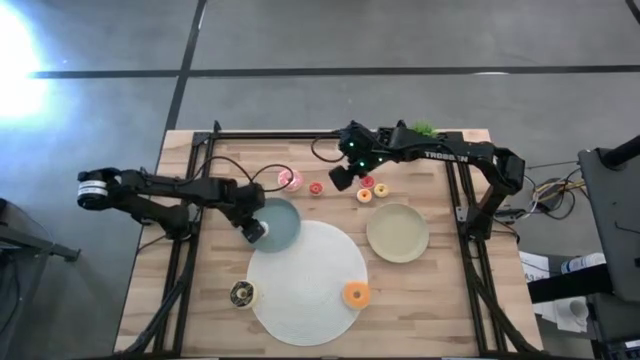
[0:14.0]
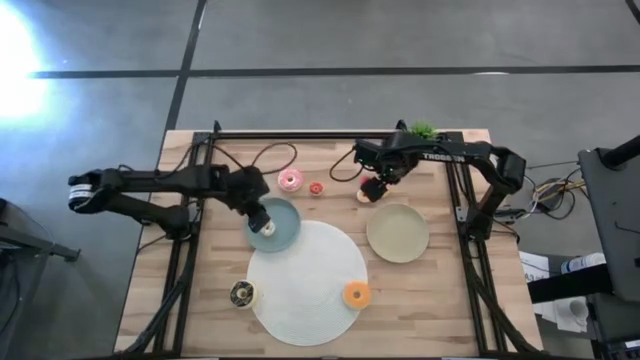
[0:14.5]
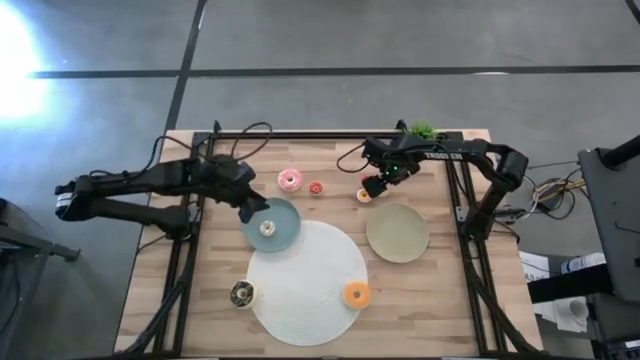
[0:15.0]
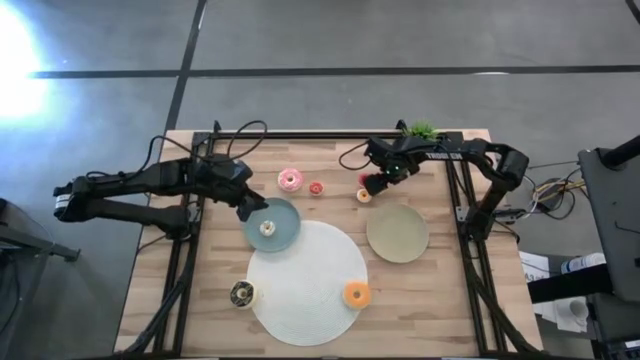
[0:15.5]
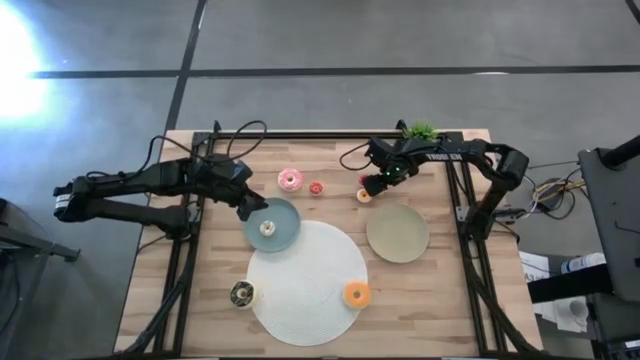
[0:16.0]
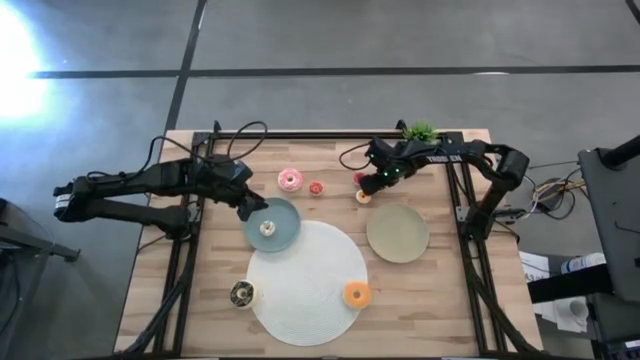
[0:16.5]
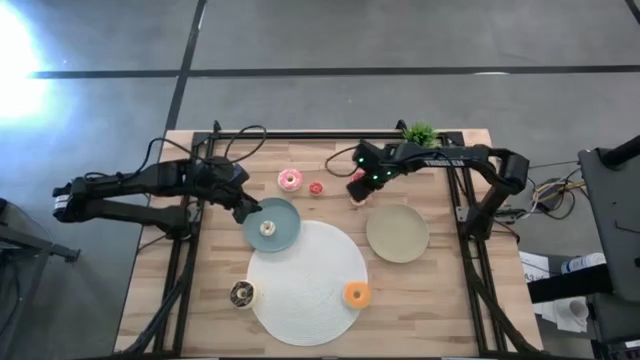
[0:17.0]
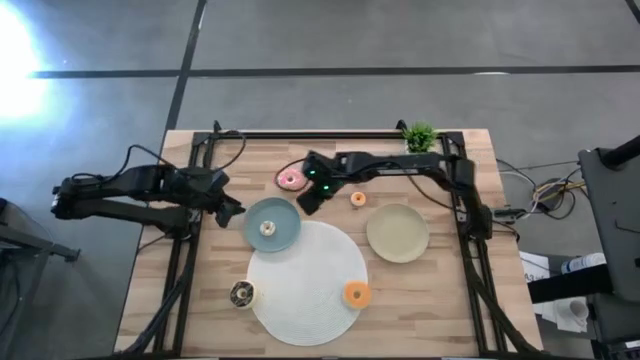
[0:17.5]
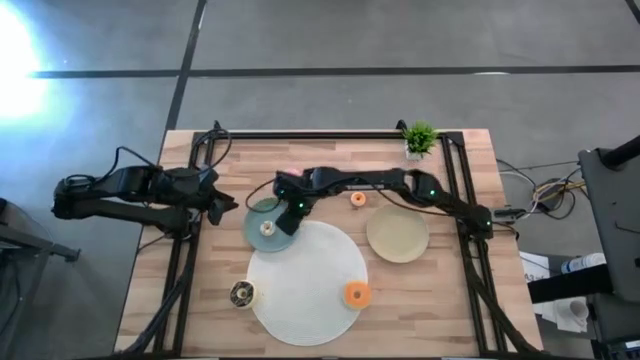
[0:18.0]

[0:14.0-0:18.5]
Task: Pick & Place donuts
Put the small yellow donut on the blue plate

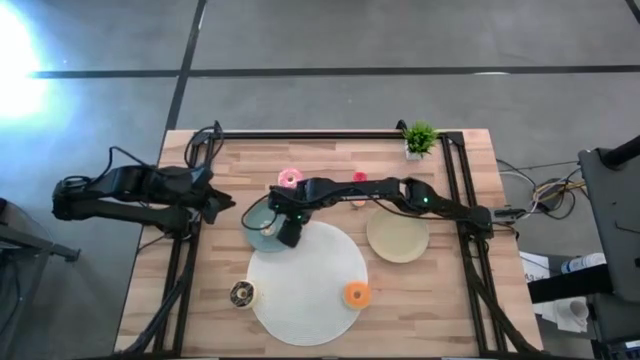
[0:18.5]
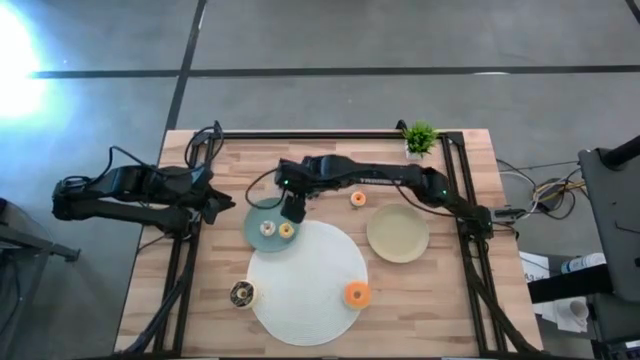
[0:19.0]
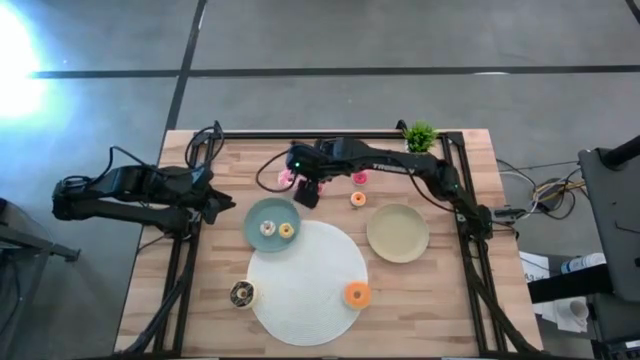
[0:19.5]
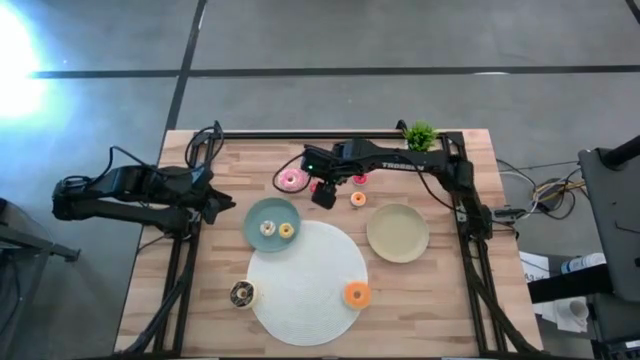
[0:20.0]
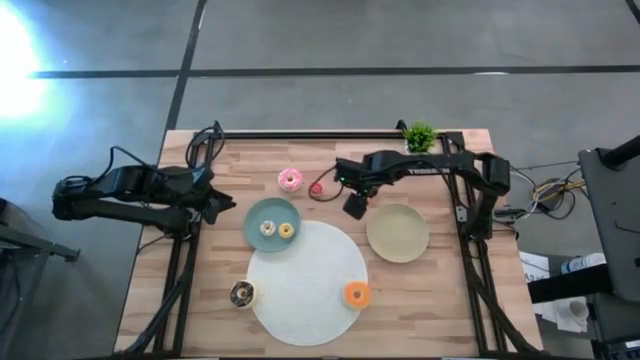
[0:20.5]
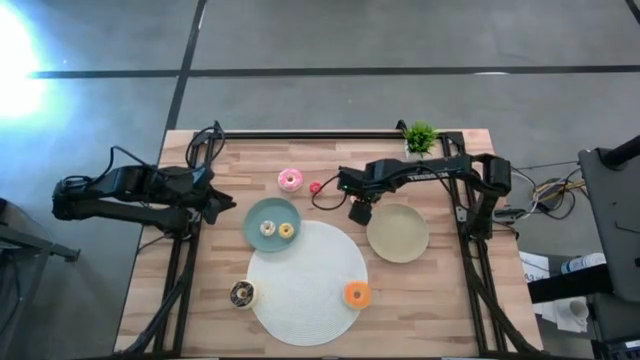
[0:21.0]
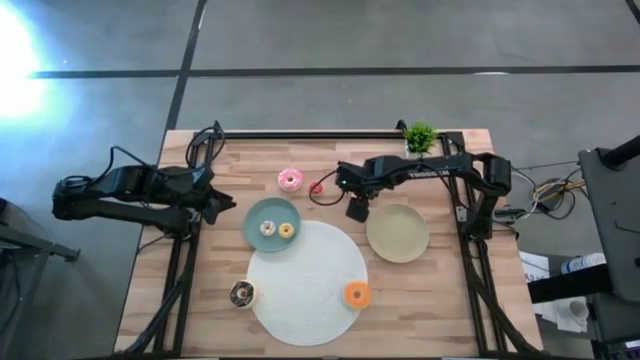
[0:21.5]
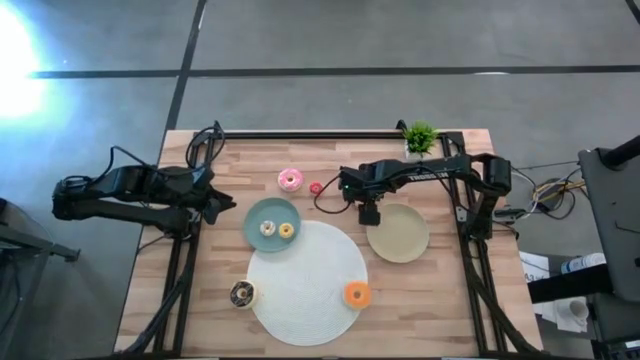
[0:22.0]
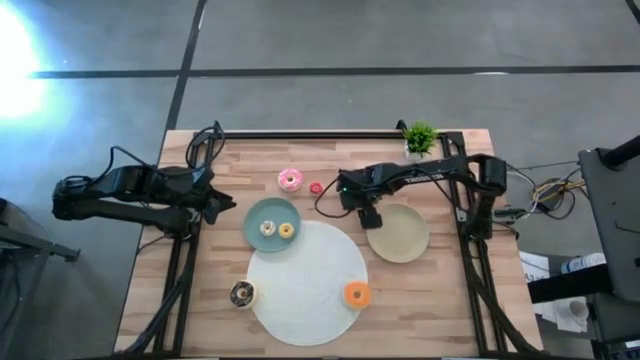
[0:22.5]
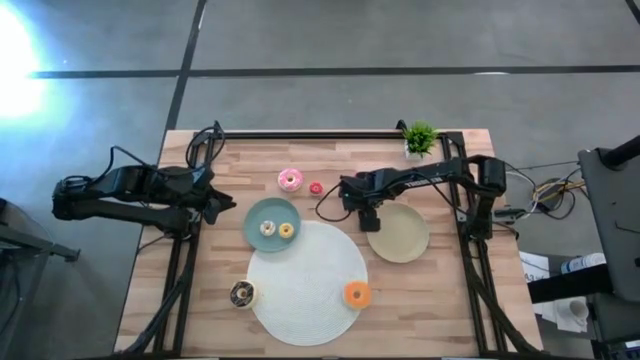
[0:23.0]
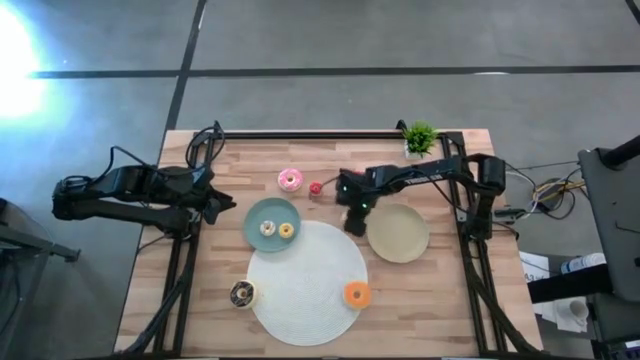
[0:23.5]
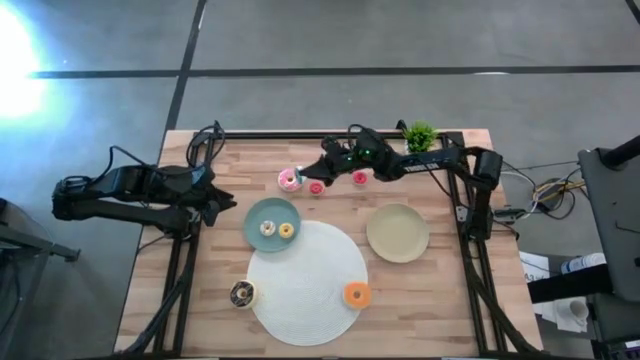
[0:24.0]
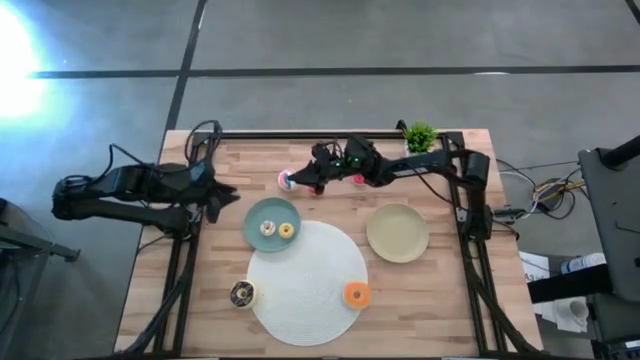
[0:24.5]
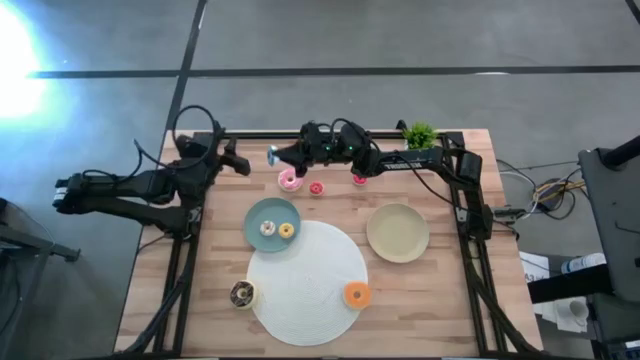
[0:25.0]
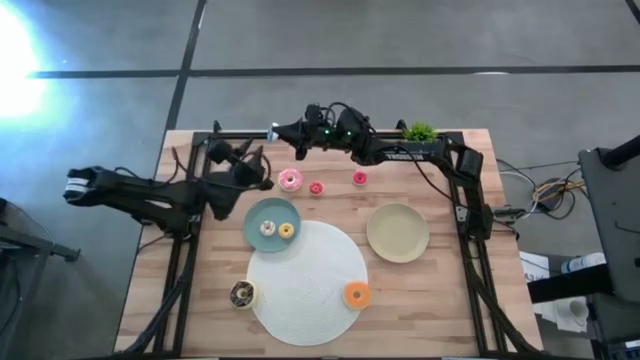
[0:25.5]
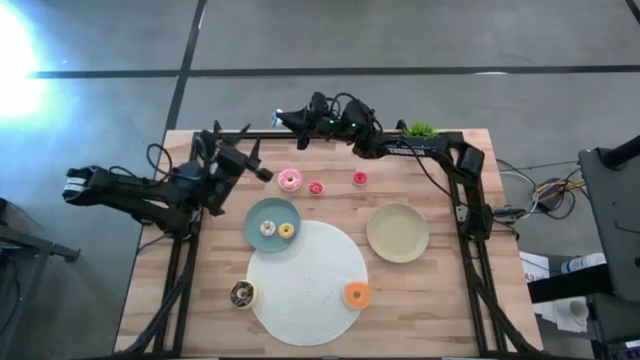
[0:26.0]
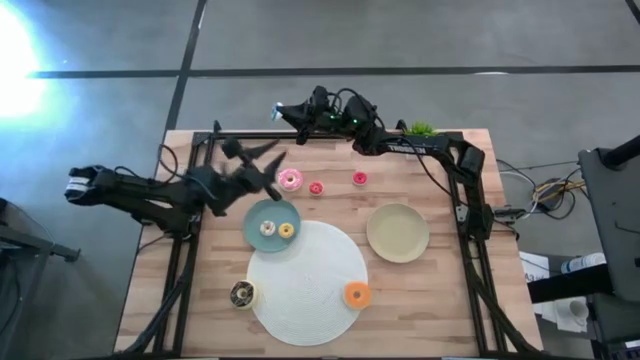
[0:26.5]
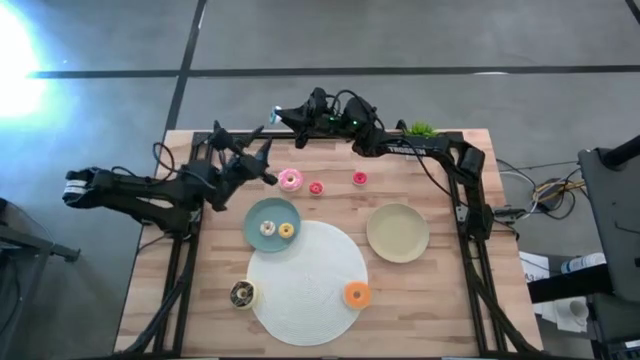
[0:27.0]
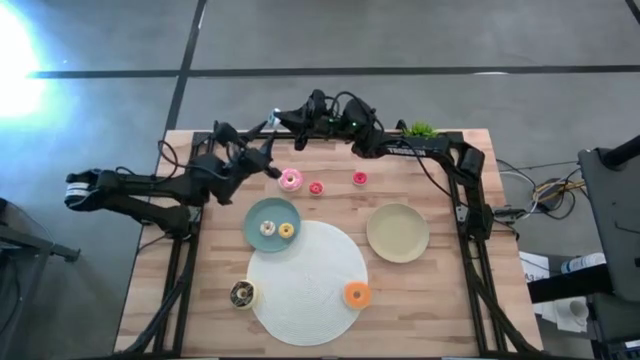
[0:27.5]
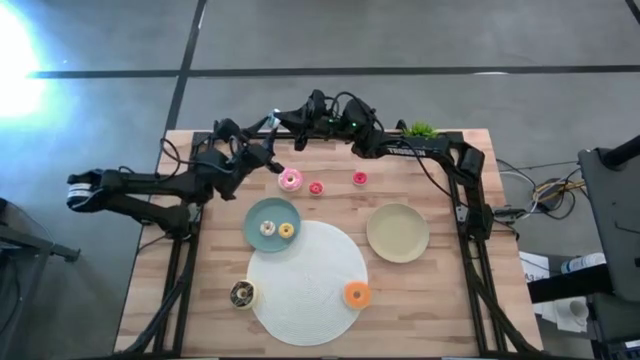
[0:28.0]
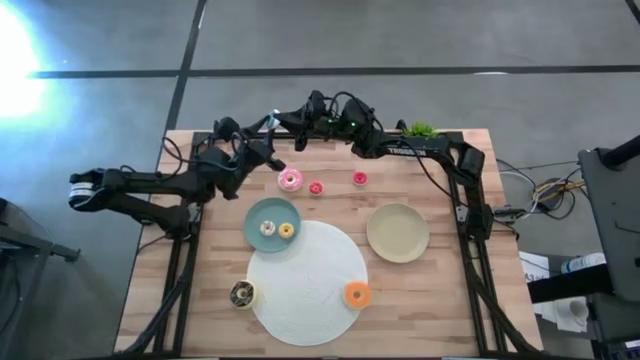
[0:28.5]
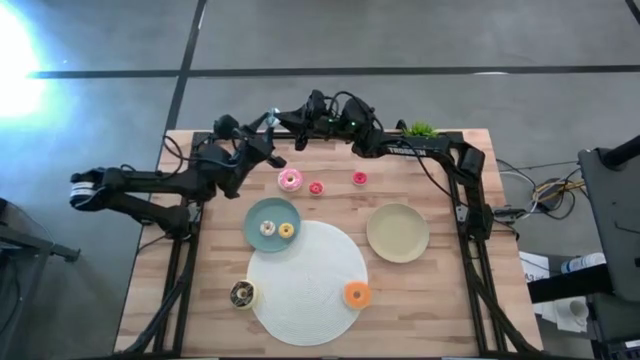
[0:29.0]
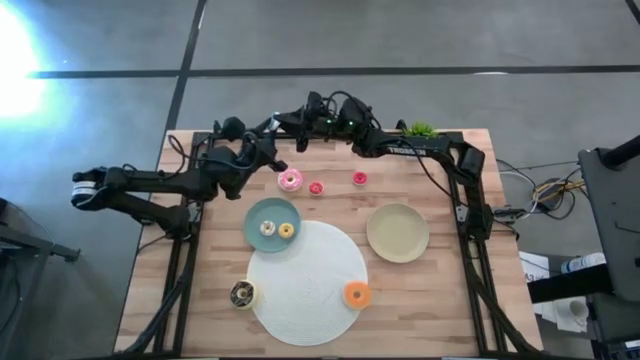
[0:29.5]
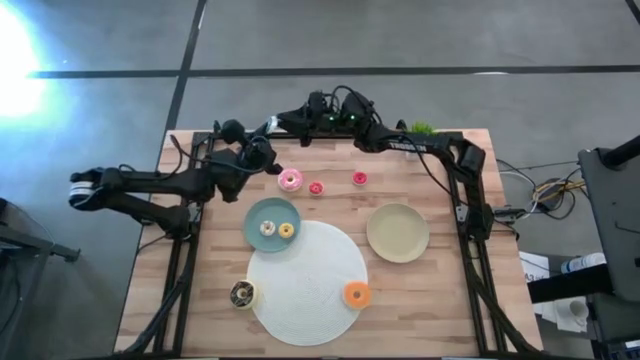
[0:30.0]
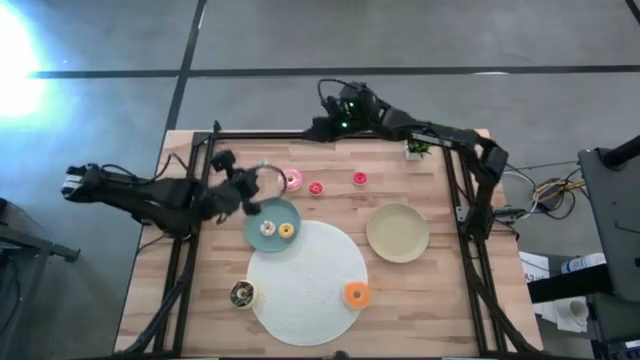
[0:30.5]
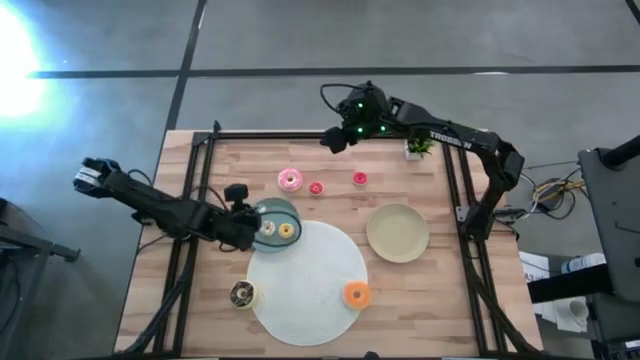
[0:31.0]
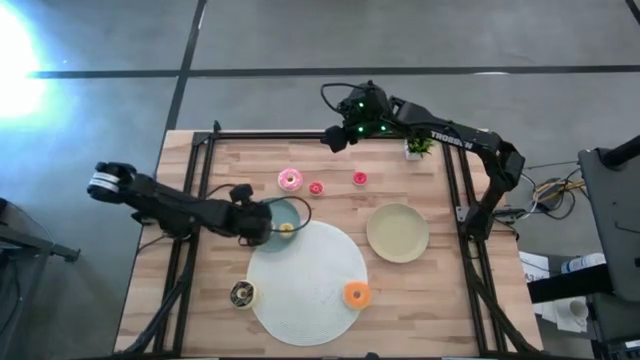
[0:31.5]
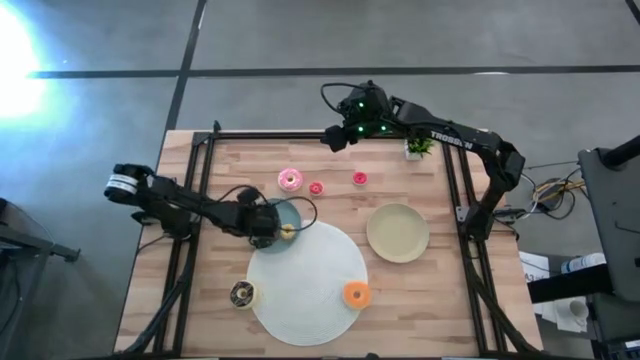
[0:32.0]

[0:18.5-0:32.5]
Put the small orange donut on the blue plate

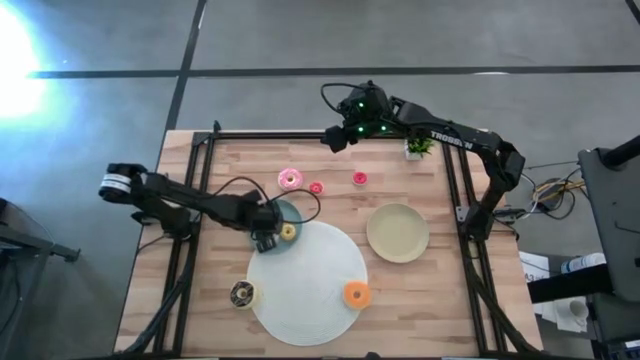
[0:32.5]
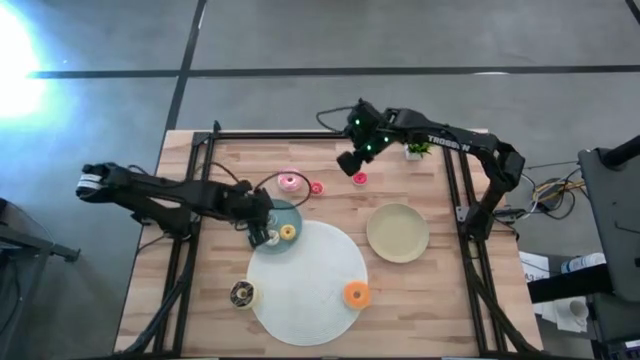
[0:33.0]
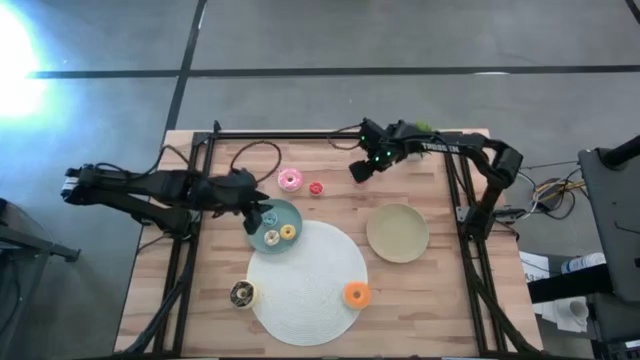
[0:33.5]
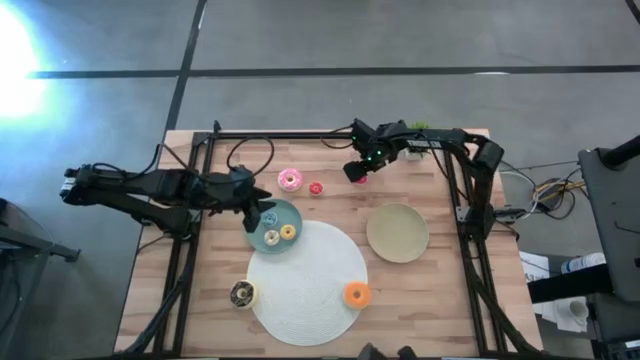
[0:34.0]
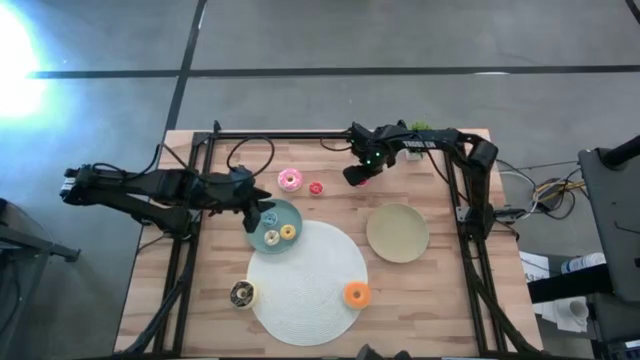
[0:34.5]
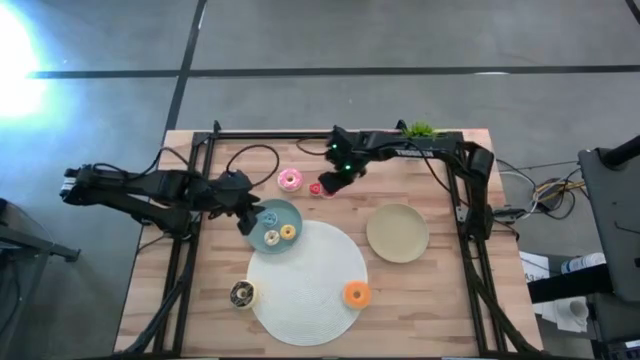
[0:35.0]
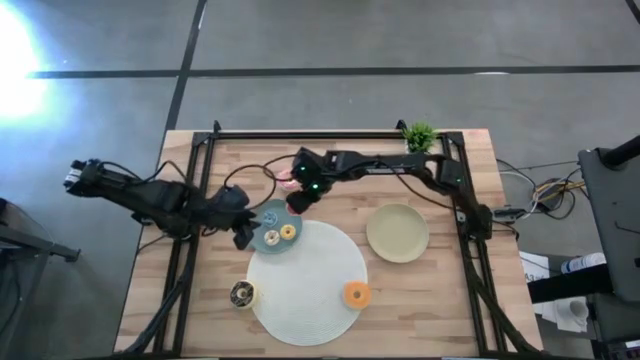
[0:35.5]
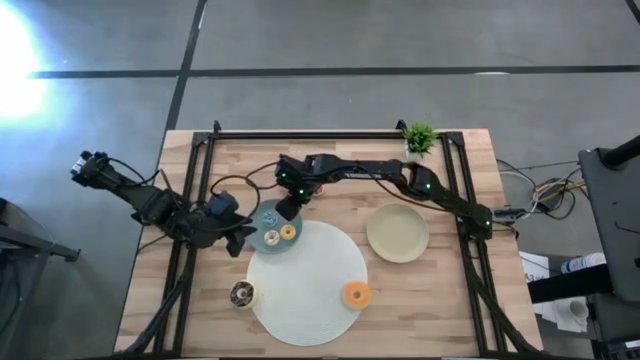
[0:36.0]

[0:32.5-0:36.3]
Put the small red donut on the blue plate
